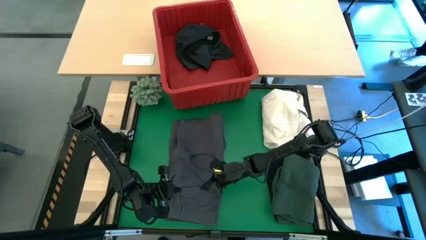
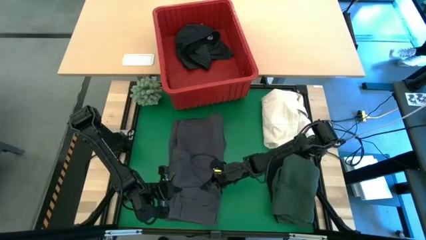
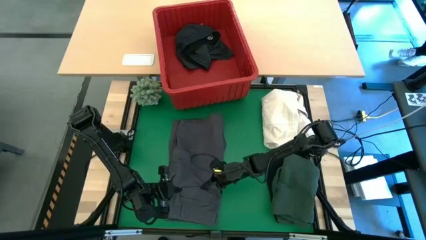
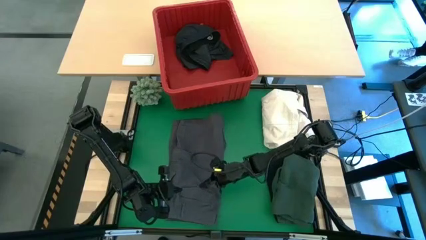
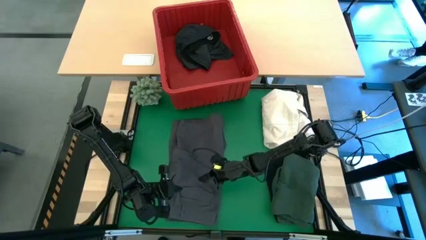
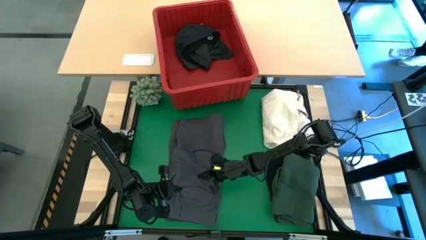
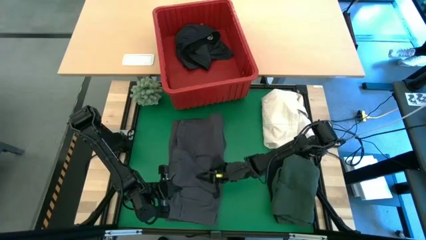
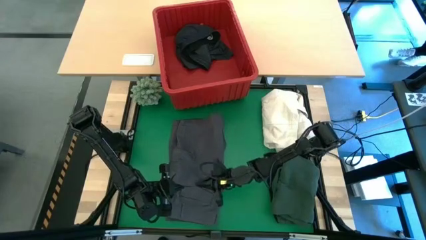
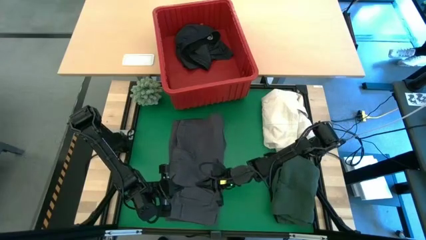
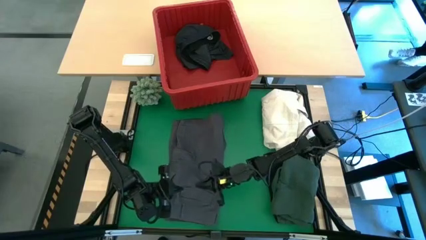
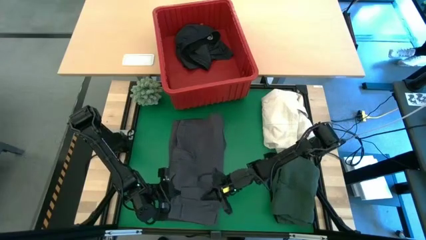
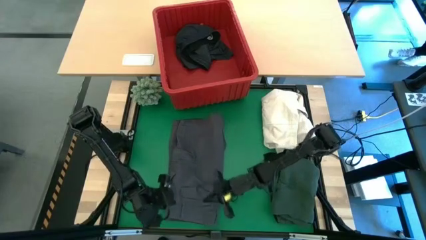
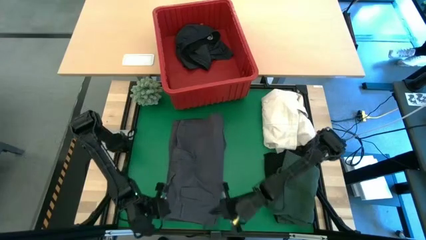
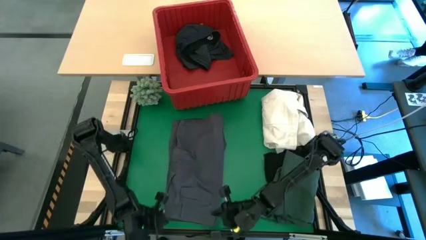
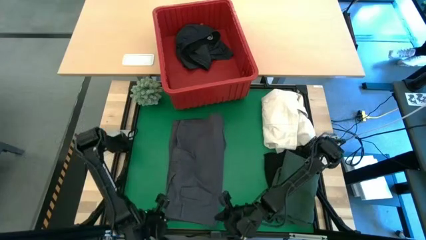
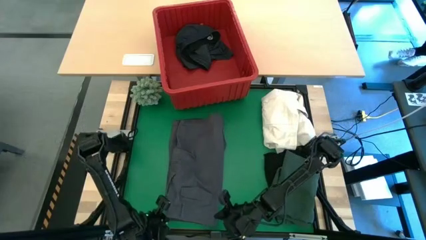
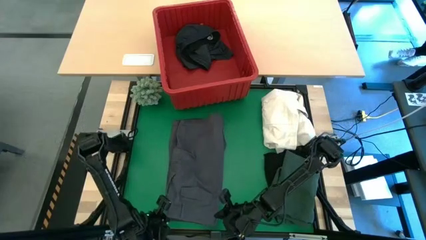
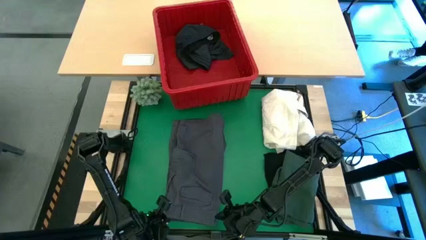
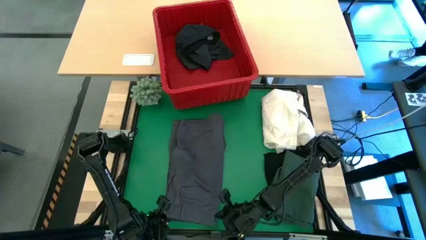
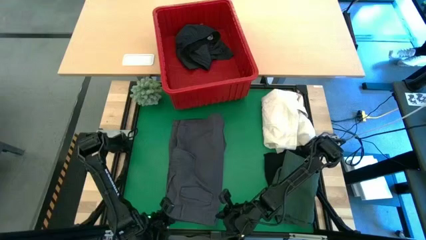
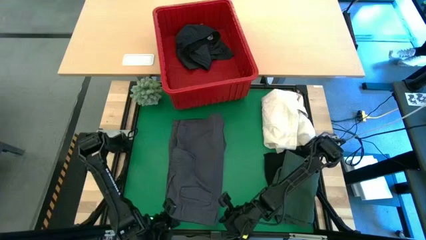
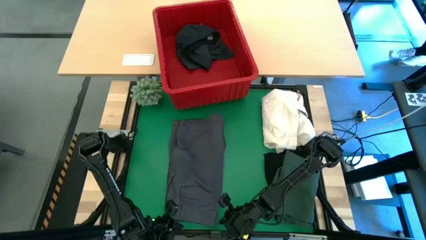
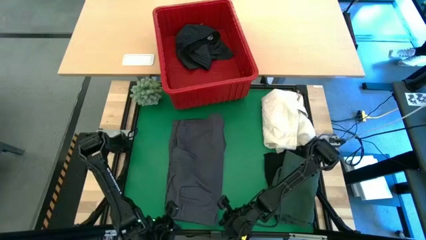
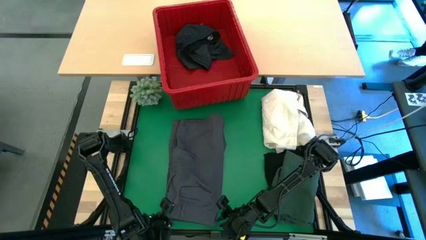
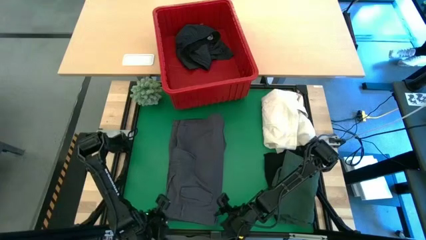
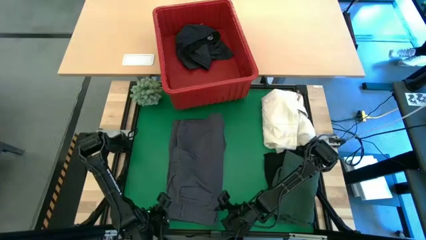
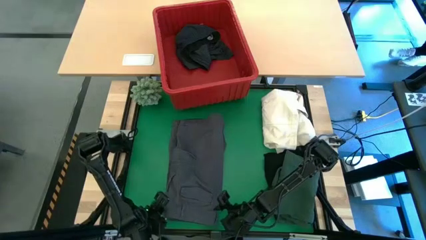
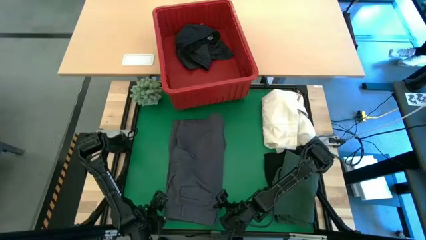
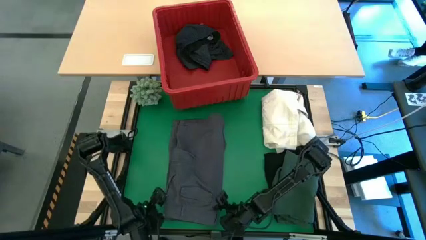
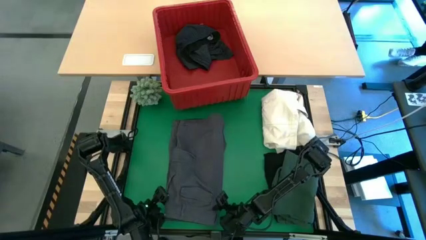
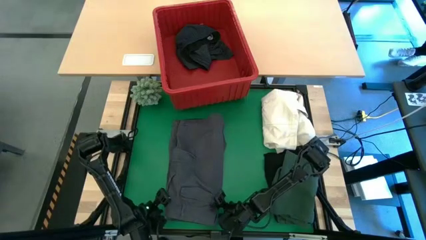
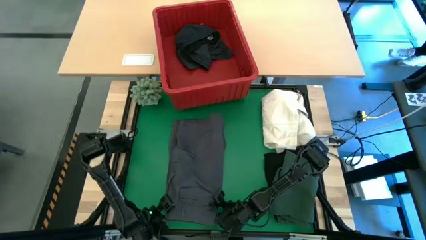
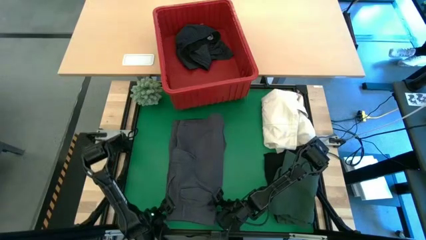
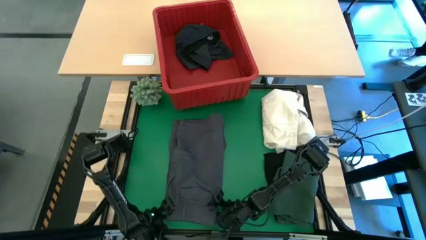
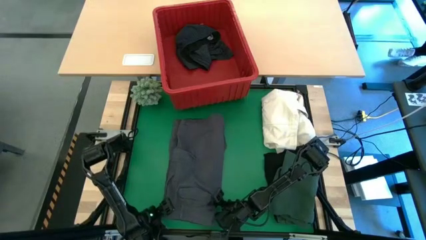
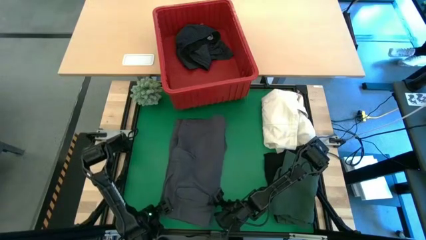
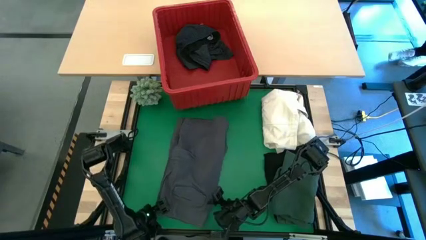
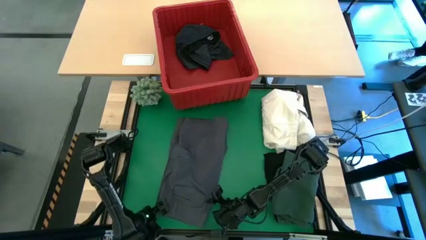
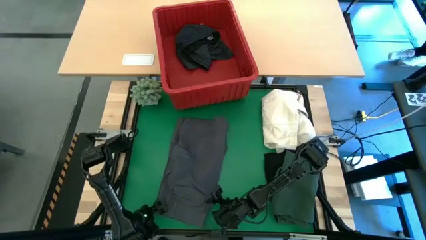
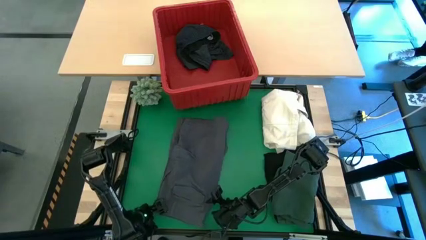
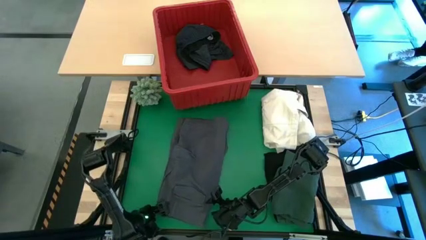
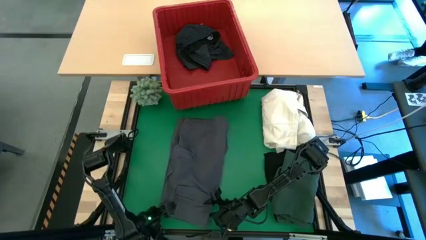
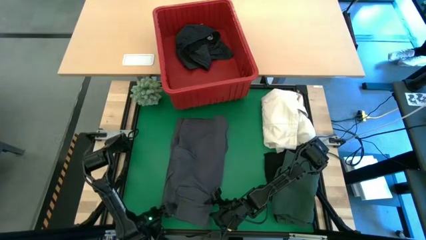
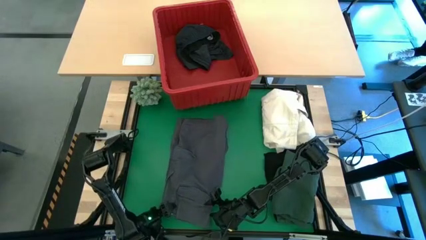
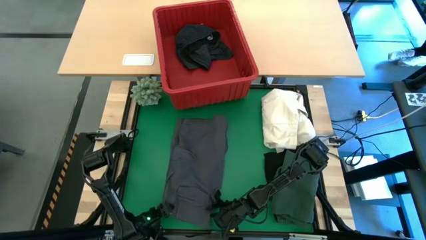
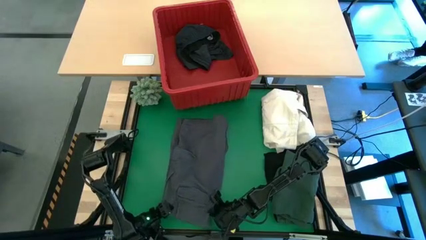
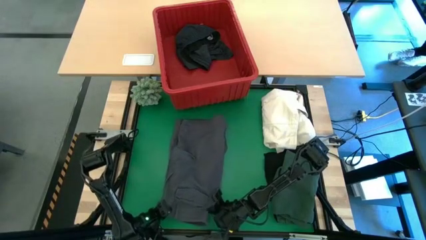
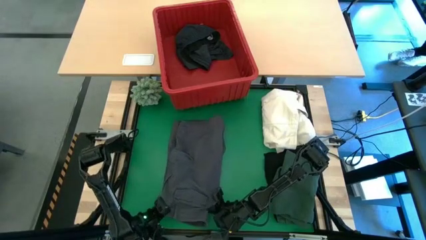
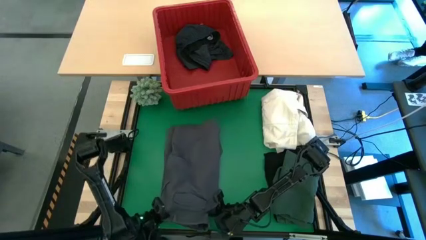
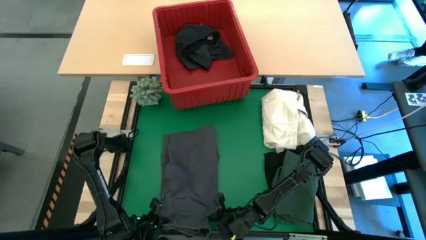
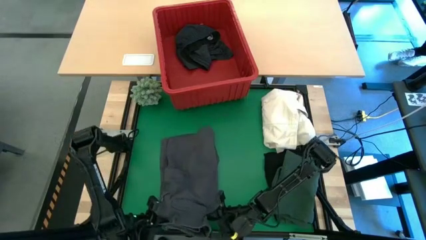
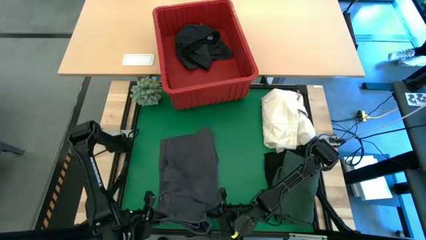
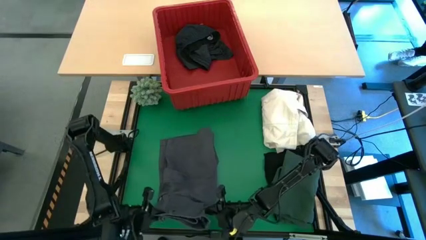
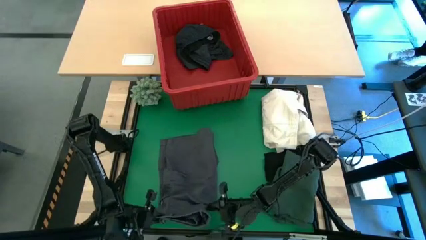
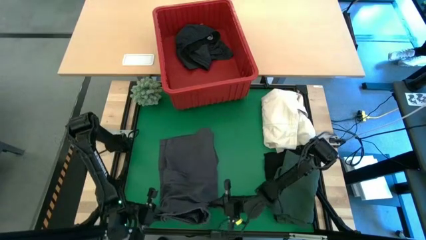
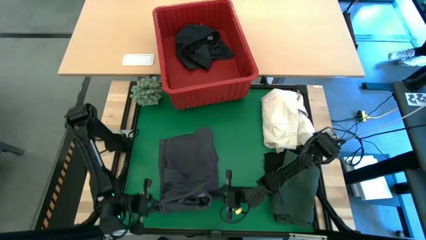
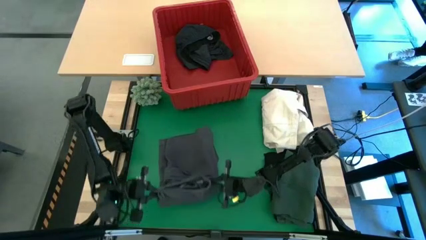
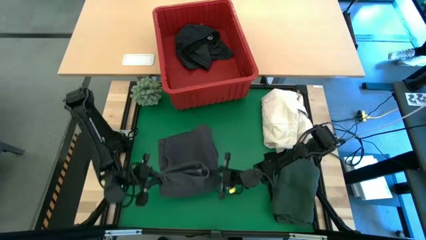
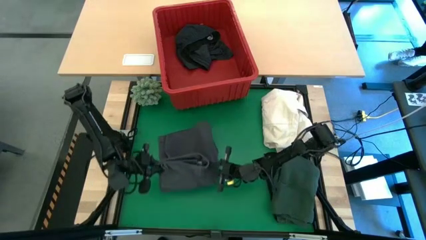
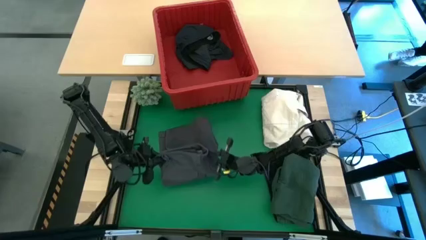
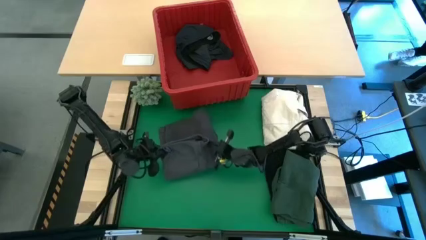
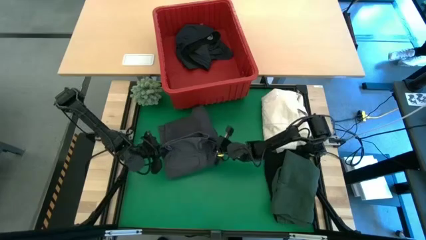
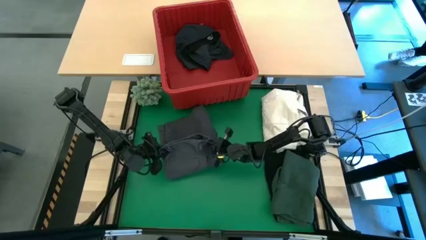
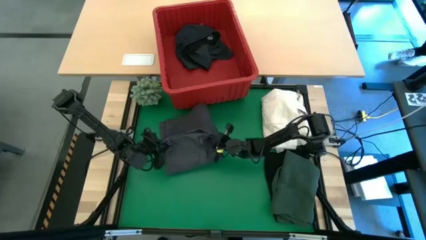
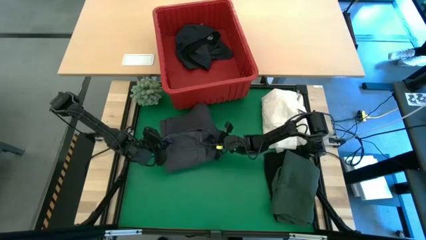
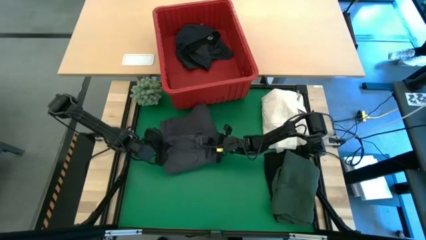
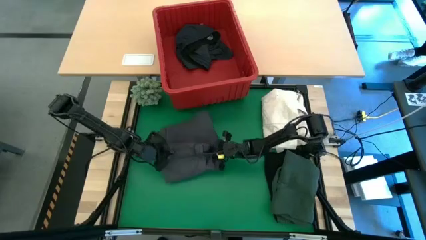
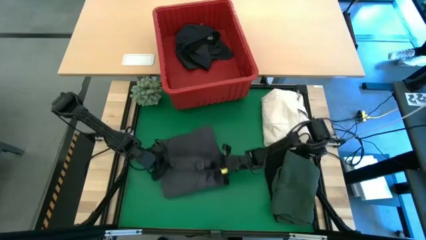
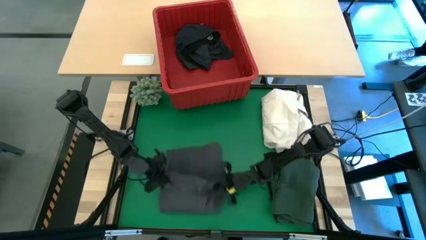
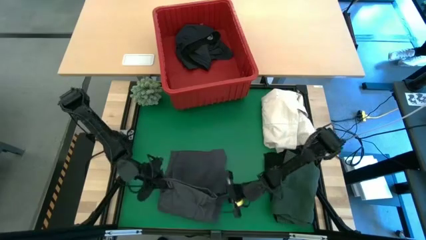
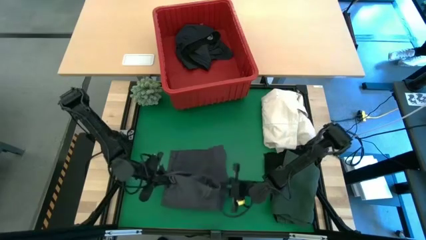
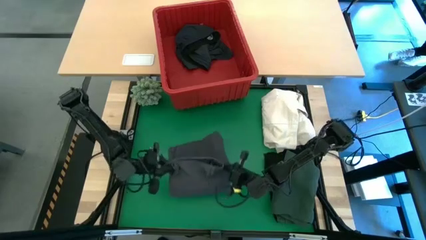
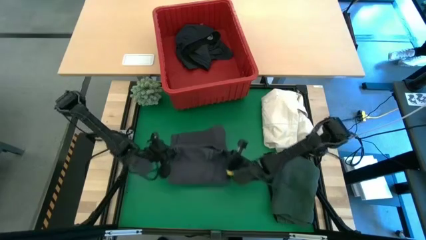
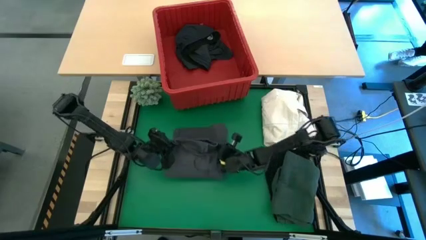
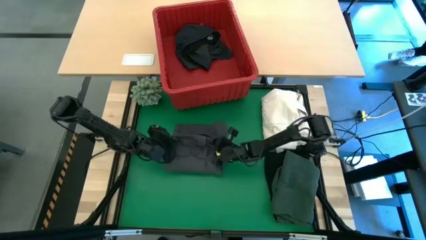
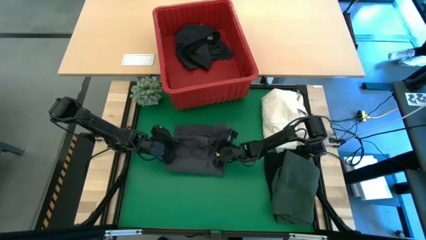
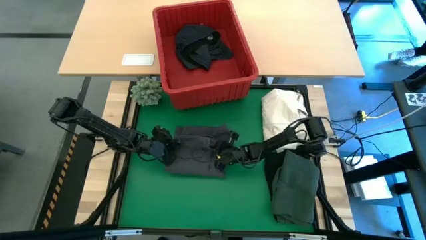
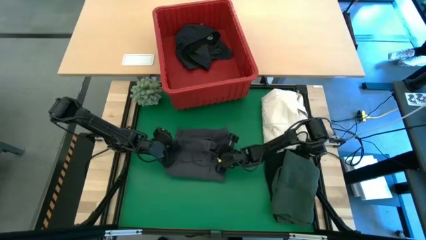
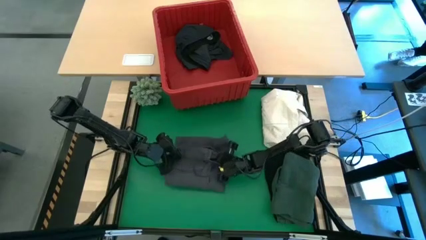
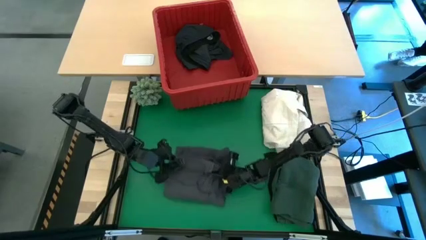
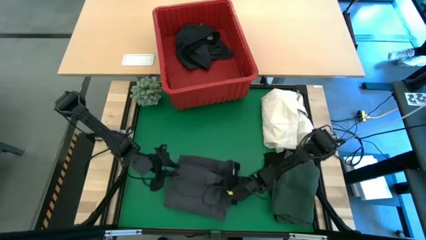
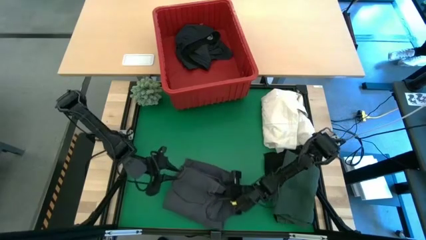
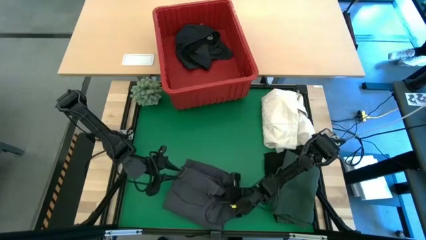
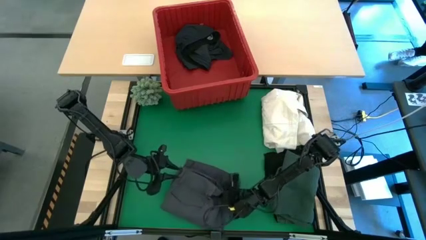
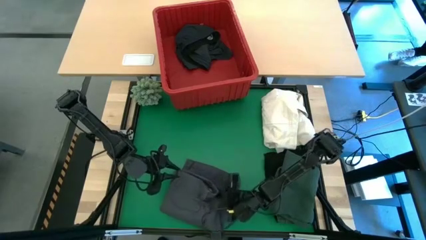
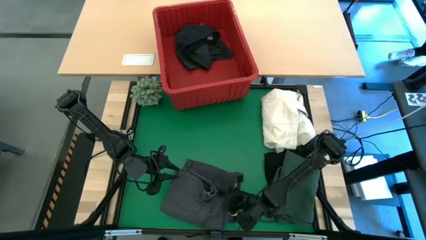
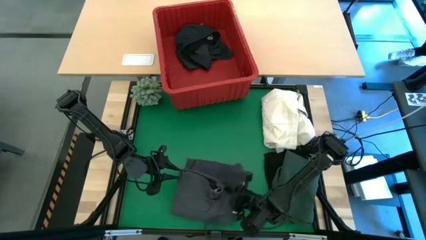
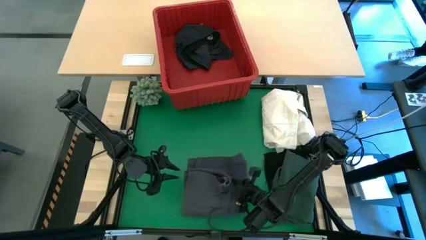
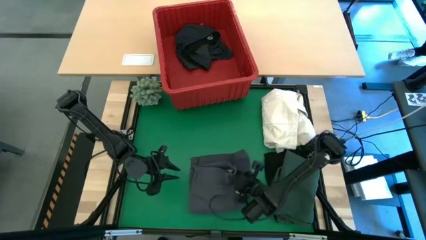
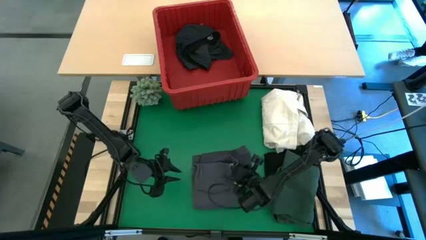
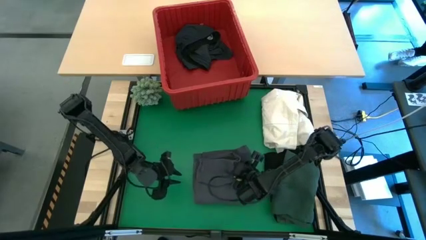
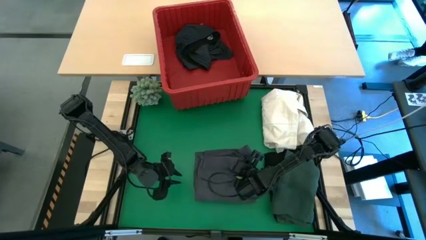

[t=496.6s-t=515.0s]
Task: Fold laundry
Fold the gray pants
